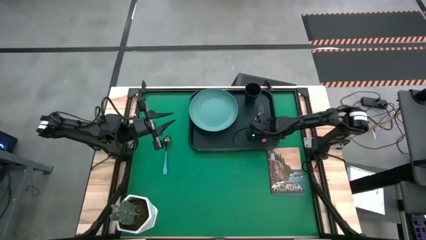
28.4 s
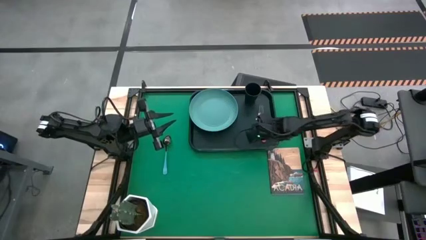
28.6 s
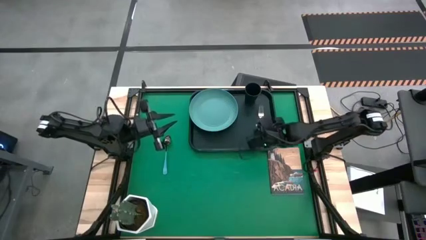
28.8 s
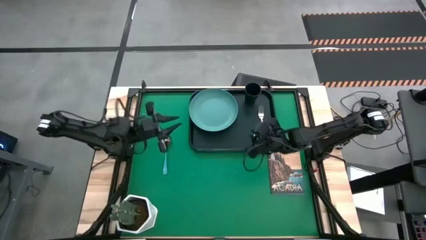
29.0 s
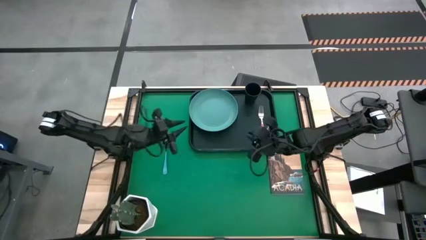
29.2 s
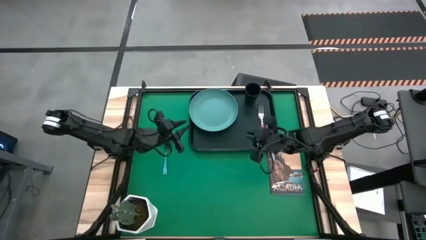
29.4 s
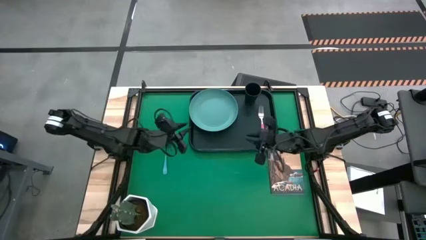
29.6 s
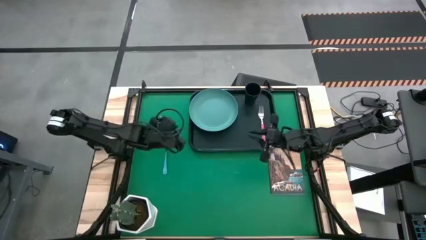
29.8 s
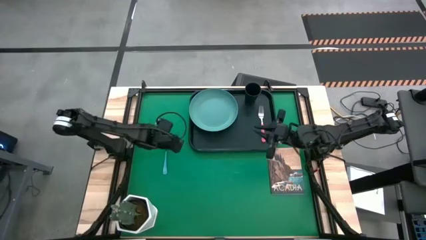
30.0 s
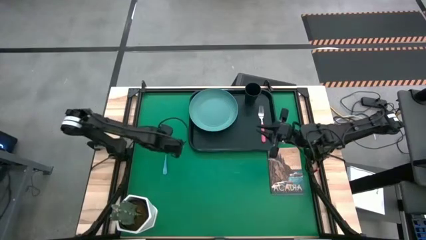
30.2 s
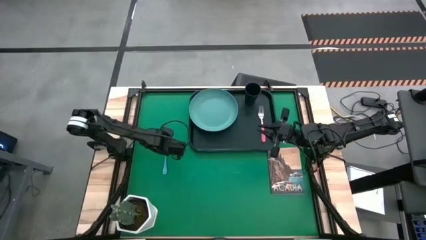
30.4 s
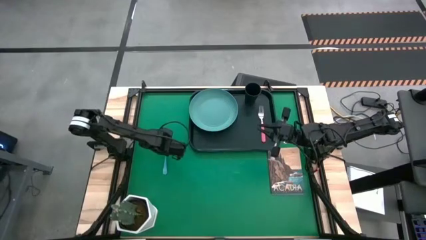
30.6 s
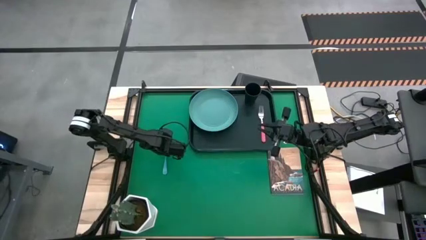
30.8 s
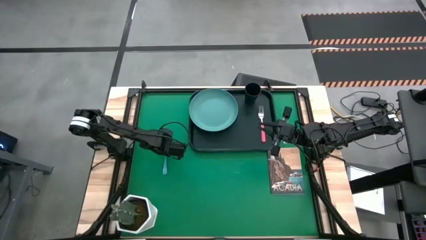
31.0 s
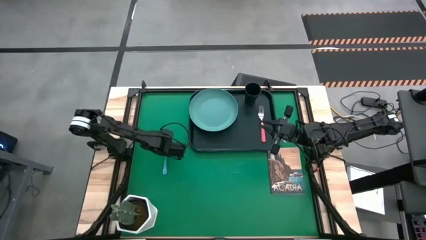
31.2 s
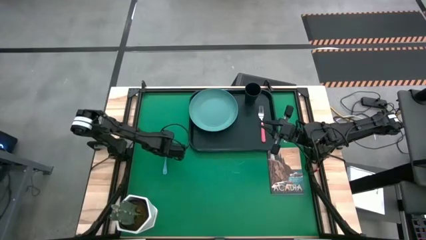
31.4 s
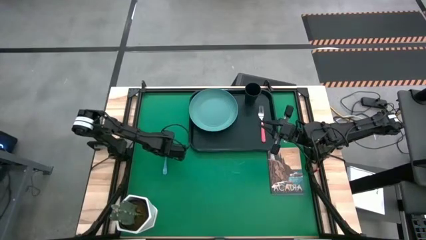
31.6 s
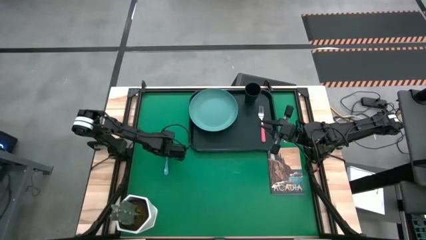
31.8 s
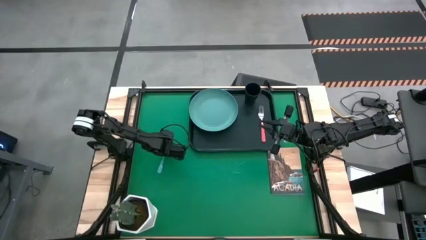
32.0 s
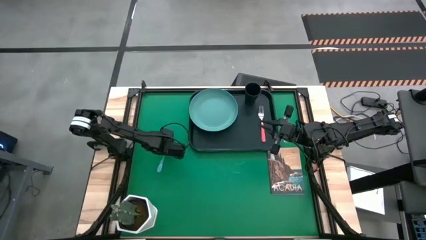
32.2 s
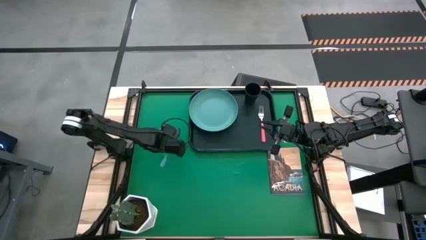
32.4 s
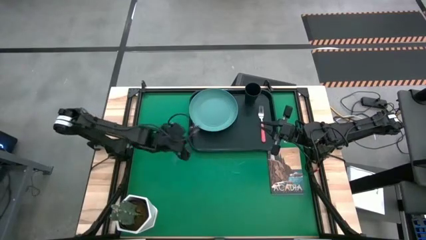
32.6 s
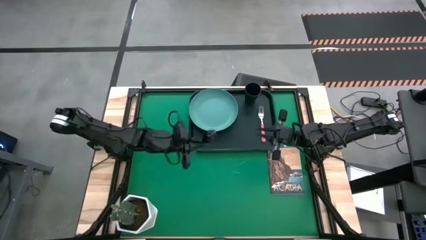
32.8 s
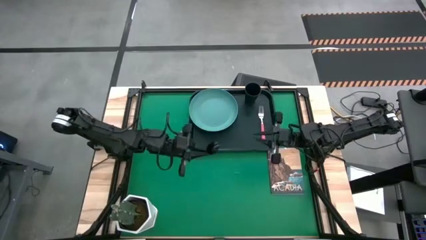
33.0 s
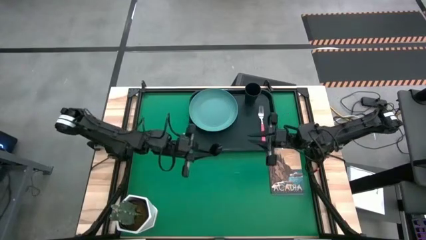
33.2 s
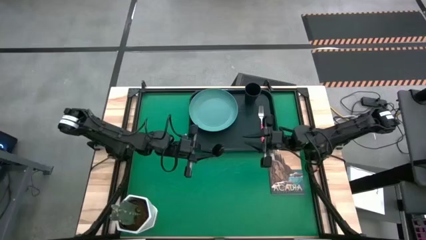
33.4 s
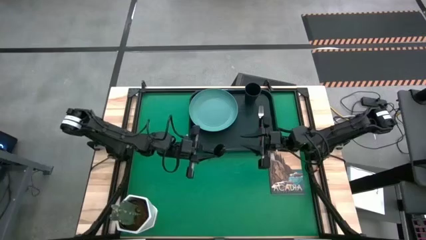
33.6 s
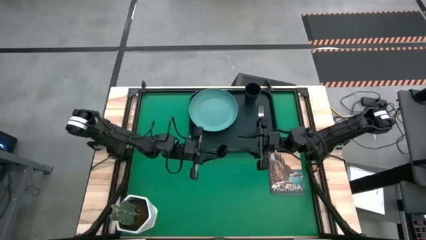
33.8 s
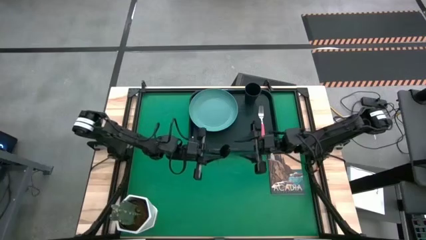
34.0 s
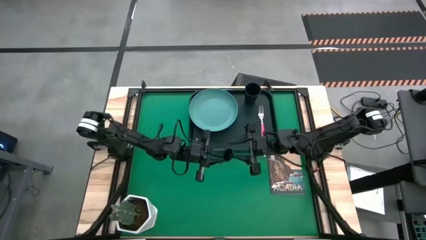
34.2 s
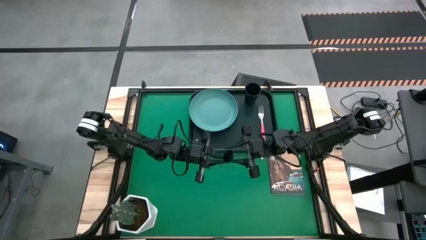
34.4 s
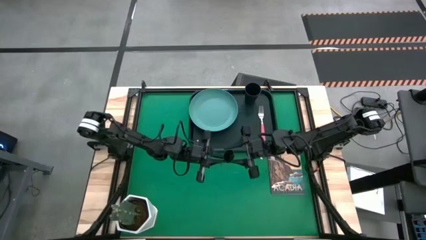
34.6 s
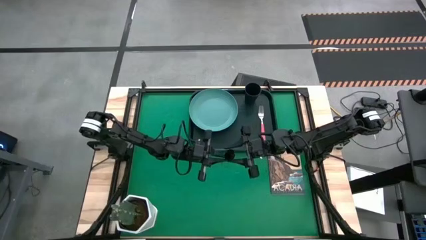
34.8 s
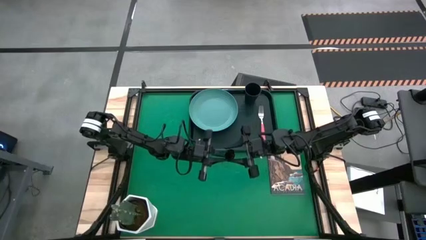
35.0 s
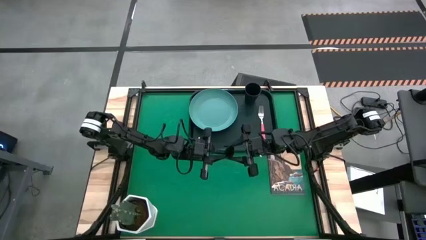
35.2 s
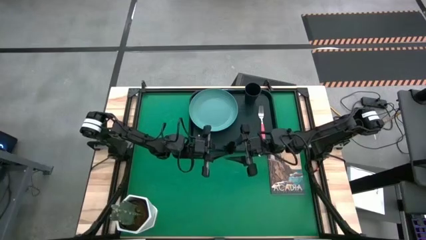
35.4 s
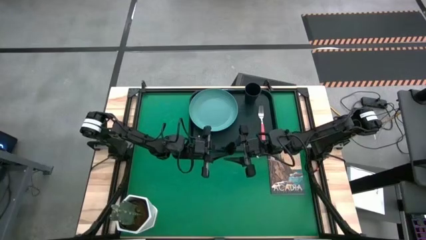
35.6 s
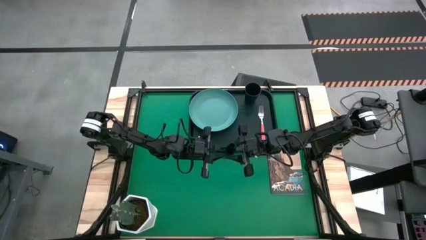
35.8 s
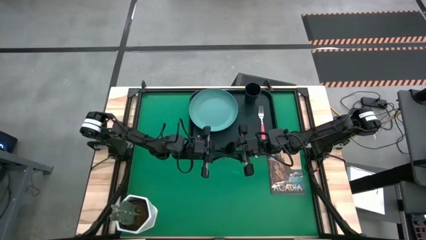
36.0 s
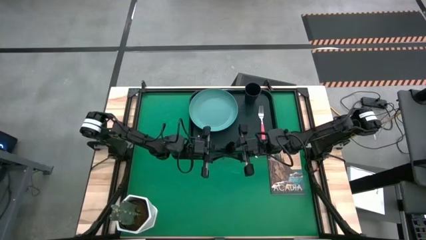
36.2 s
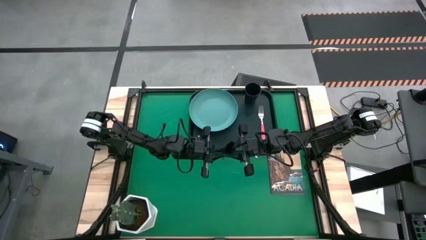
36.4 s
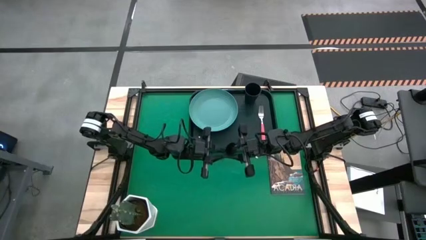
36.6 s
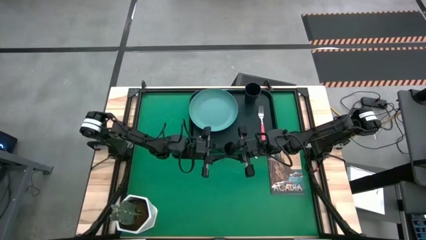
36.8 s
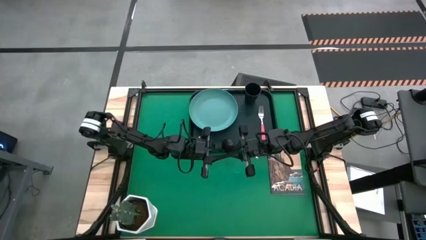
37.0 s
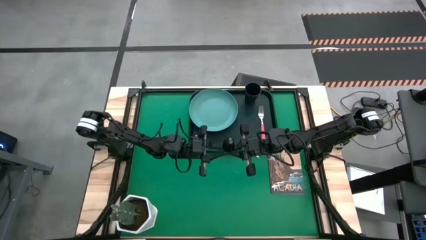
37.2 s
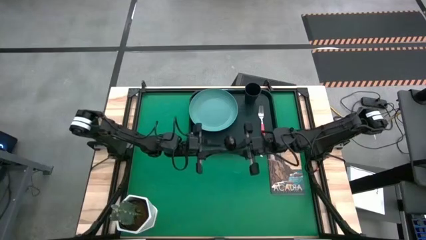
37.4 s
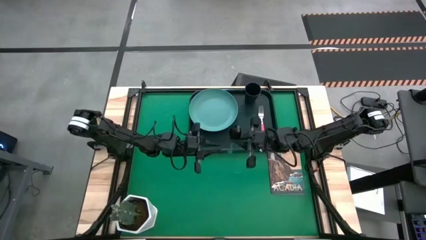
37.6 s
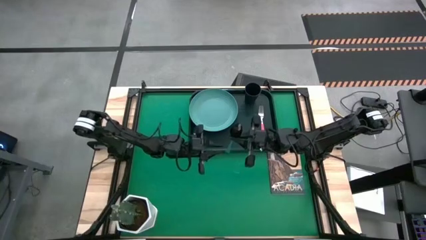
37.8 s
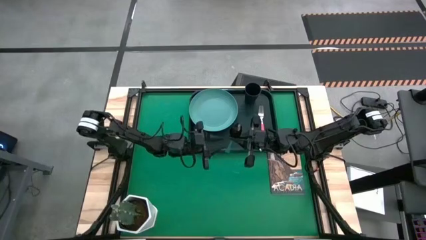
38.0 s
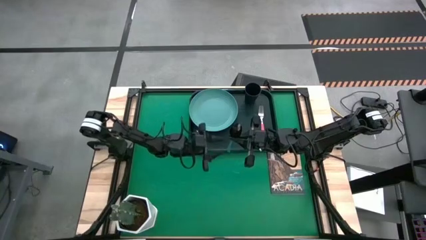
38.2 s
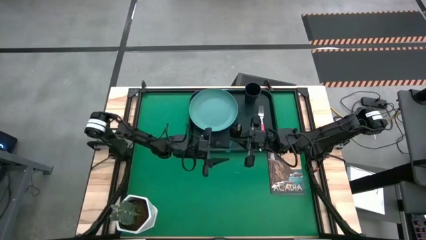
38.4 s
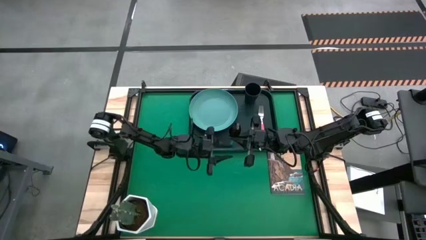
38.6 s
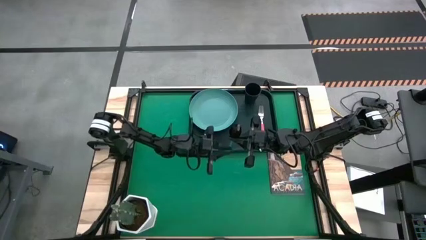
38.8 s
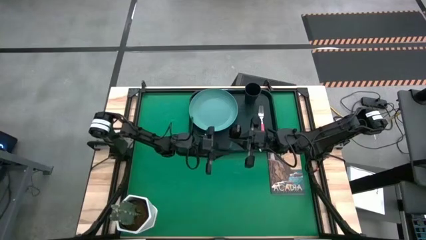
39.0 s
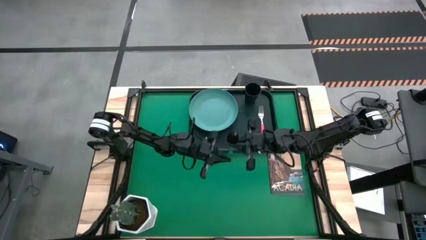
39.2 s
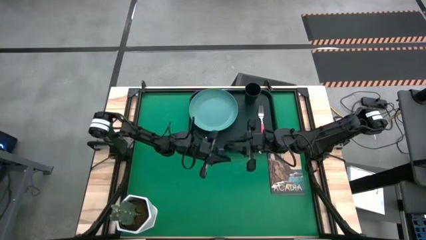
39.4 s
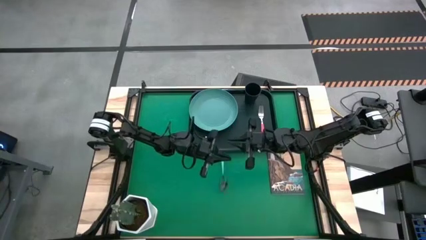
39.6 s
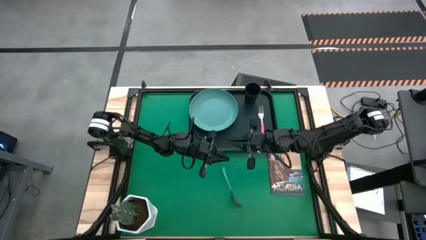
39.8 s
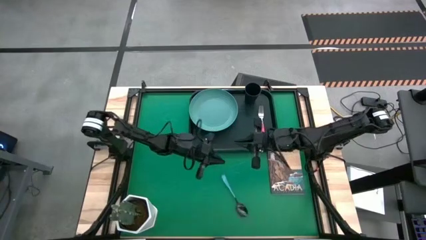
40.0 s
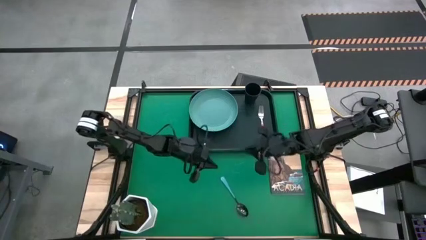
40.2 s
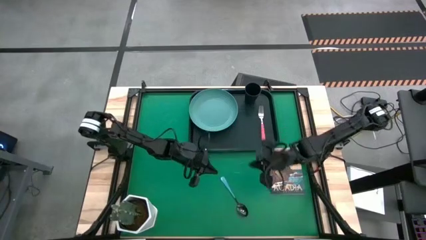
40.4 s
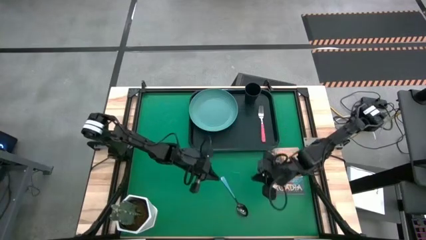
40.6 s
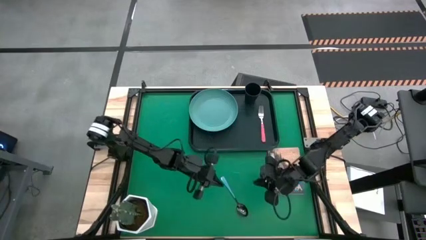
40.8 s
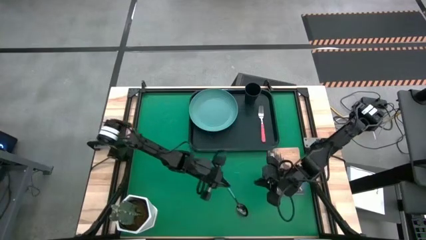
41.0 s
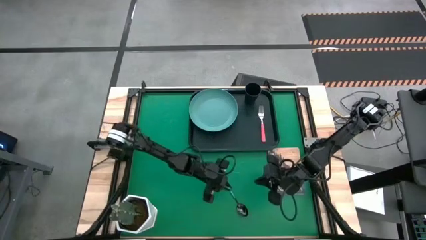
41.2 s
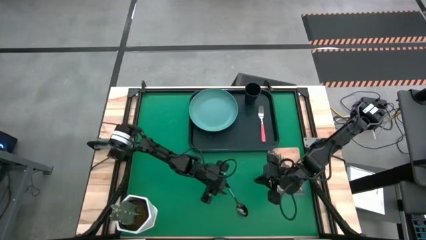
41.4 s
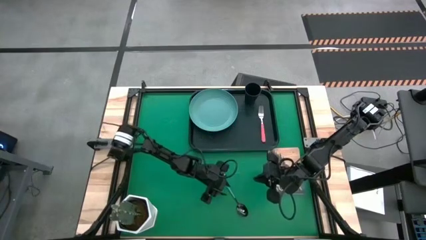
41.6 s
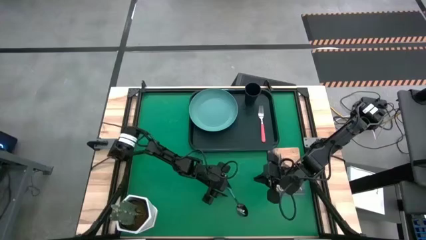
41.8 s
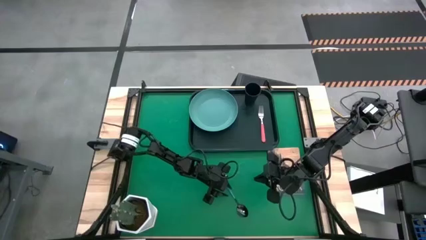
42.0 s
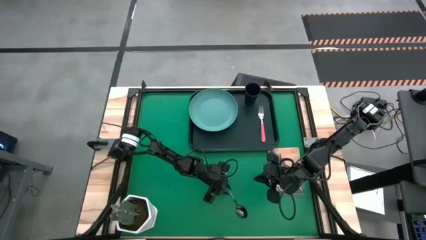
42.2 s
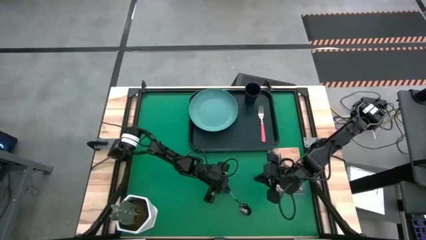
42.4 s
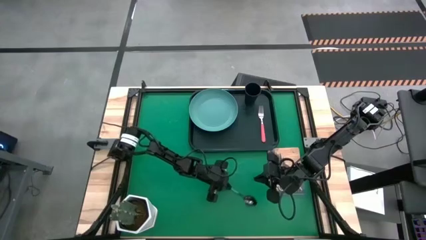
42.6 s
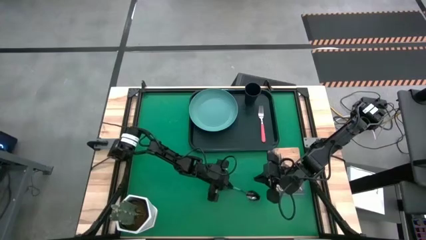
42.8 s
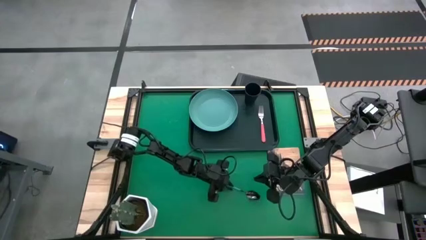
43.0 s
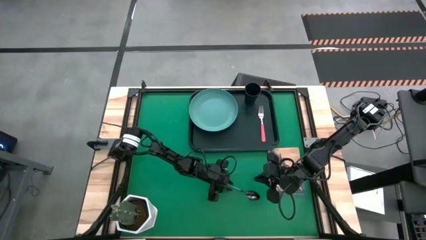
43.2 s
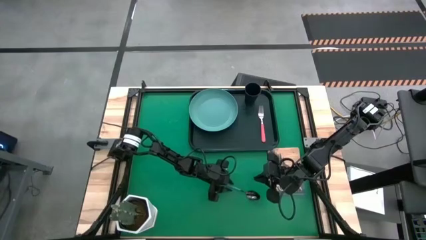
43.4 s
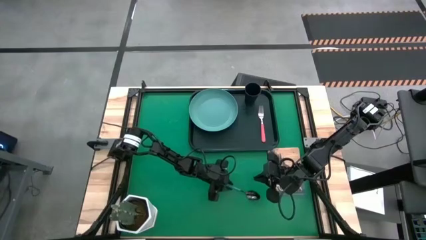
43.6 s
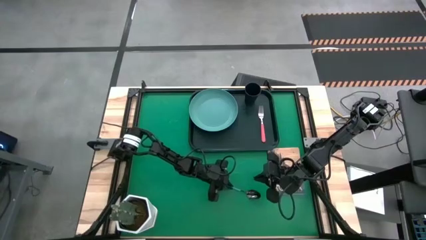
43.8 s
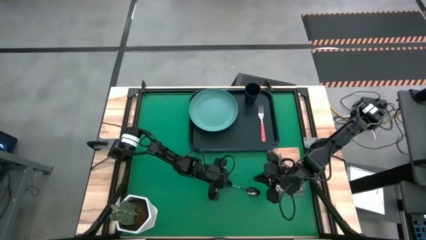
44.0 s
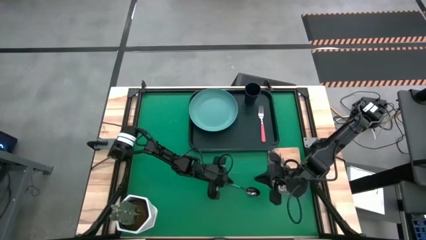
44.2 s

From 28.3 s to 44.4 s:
Task: Pick and place plate/cup/fork/spoon on tray
Put the blue spoon on the black serving tray to the right of the green plate
